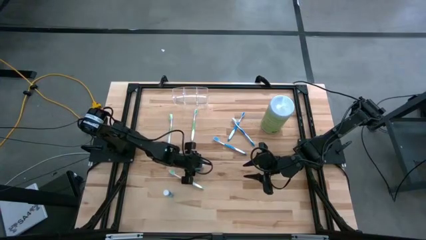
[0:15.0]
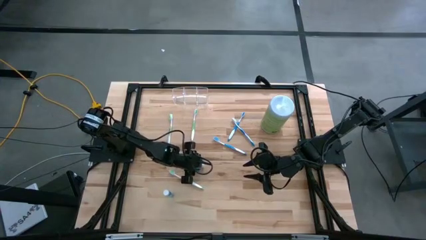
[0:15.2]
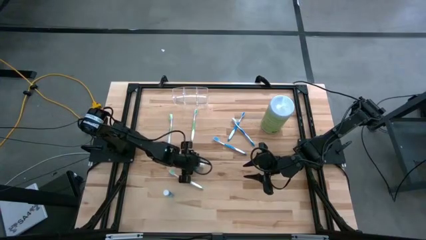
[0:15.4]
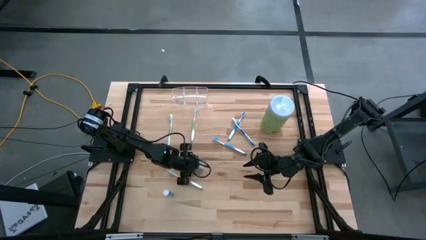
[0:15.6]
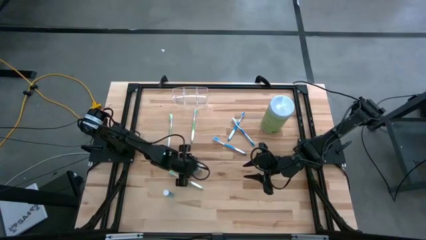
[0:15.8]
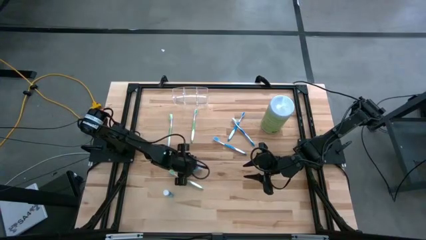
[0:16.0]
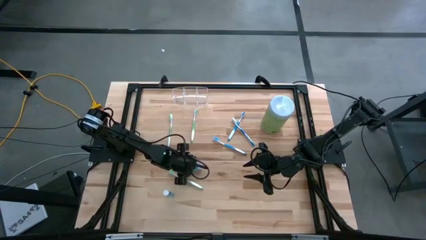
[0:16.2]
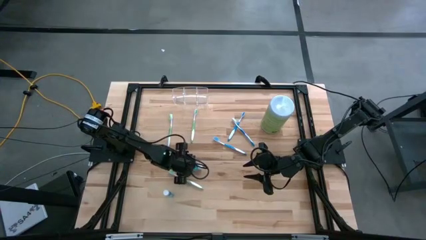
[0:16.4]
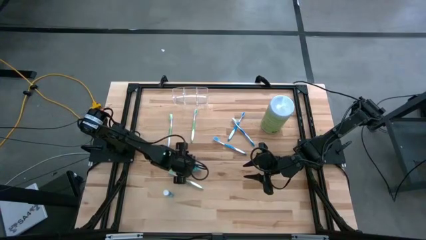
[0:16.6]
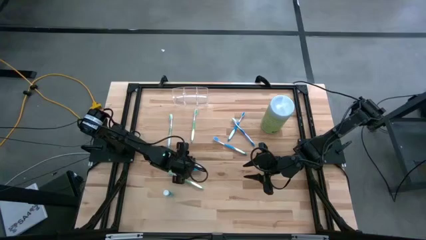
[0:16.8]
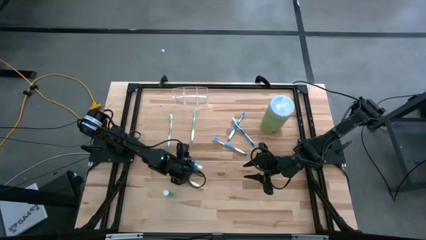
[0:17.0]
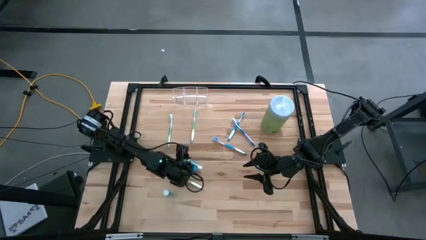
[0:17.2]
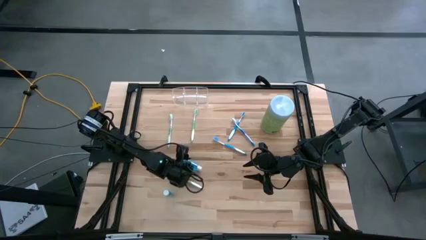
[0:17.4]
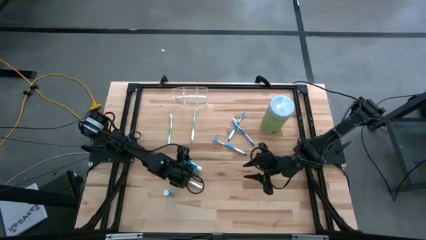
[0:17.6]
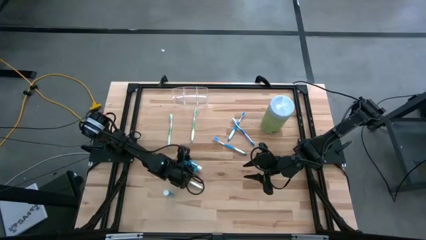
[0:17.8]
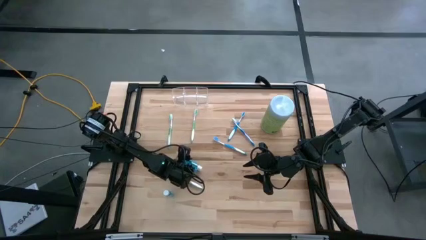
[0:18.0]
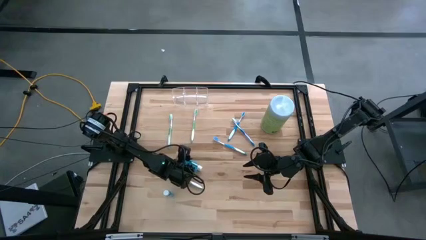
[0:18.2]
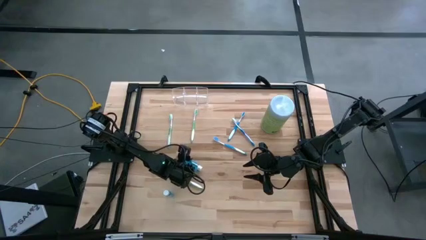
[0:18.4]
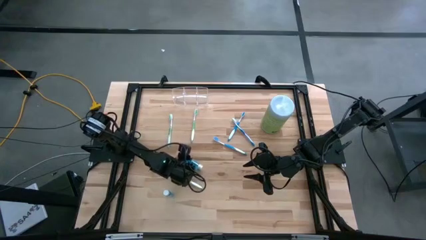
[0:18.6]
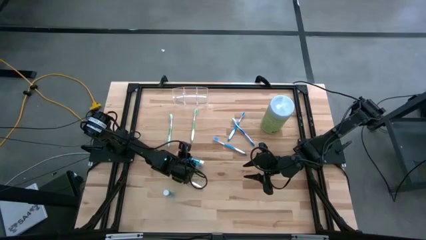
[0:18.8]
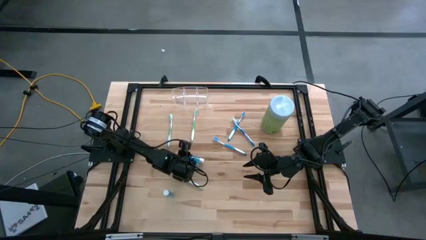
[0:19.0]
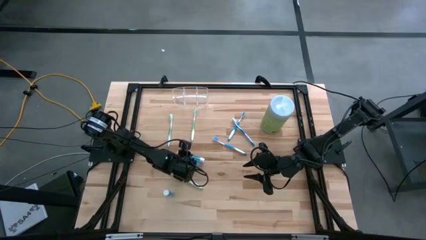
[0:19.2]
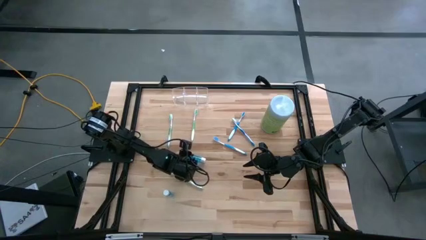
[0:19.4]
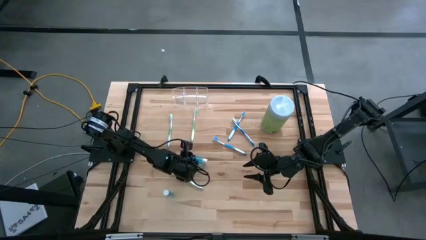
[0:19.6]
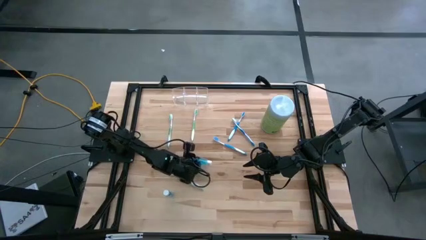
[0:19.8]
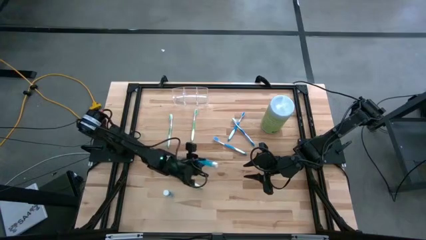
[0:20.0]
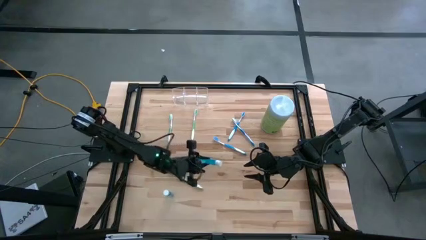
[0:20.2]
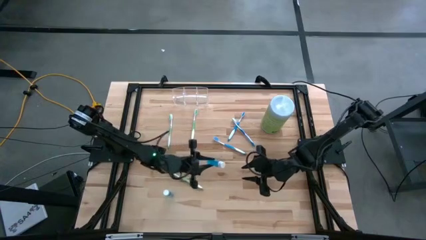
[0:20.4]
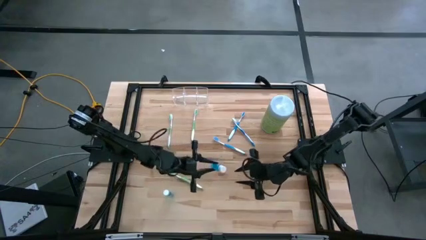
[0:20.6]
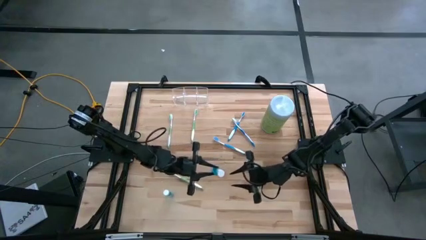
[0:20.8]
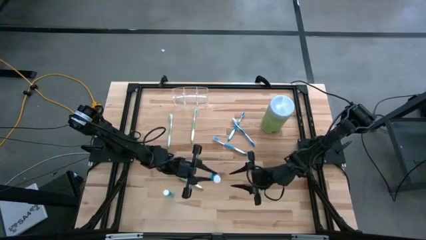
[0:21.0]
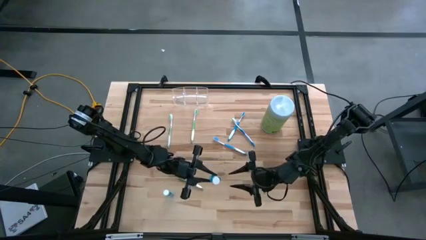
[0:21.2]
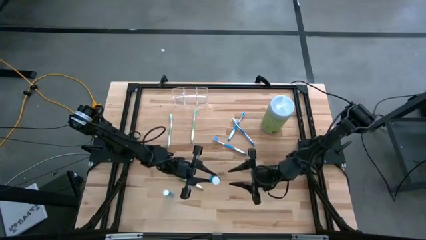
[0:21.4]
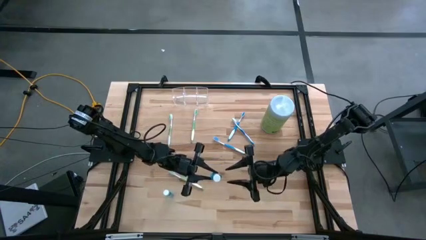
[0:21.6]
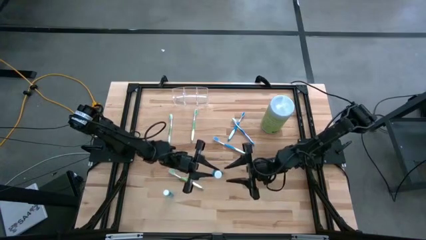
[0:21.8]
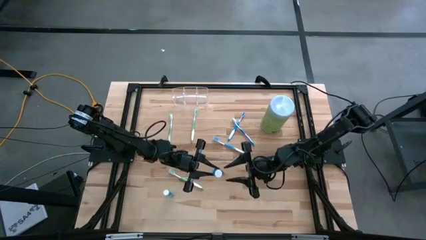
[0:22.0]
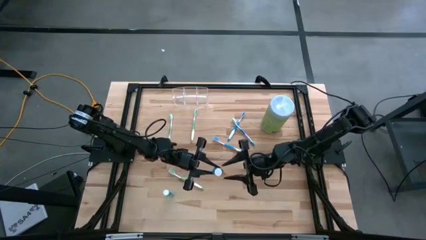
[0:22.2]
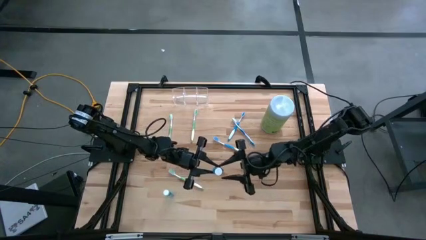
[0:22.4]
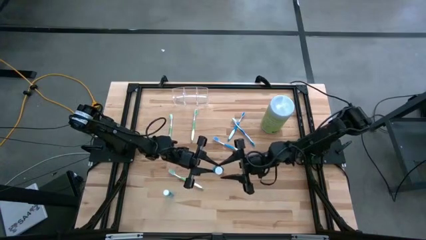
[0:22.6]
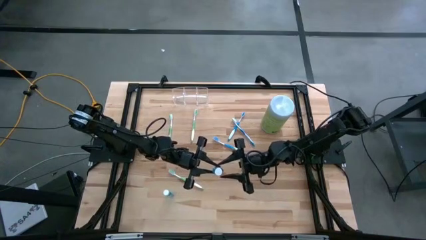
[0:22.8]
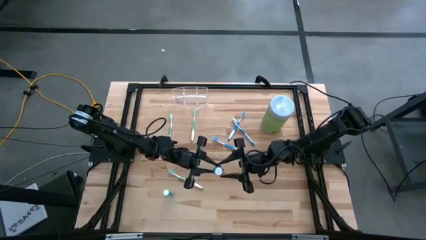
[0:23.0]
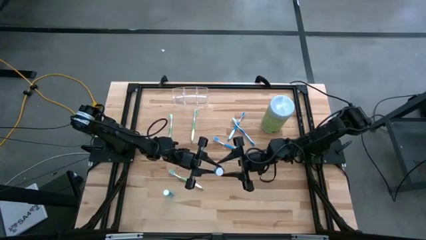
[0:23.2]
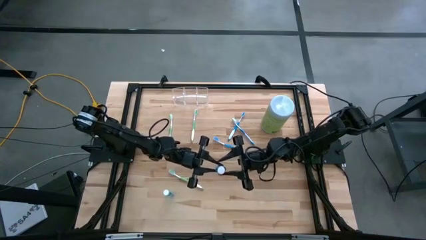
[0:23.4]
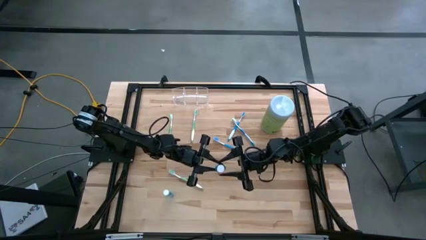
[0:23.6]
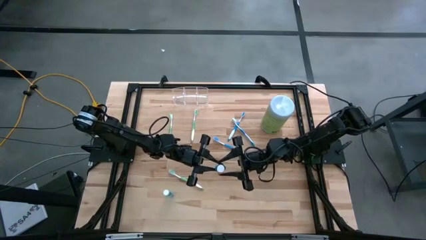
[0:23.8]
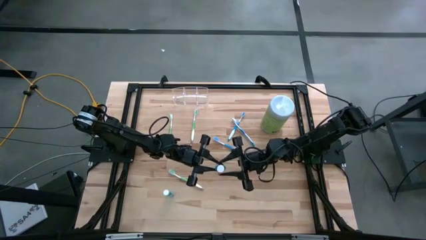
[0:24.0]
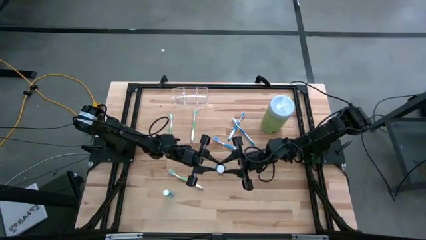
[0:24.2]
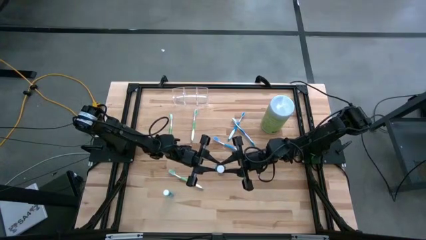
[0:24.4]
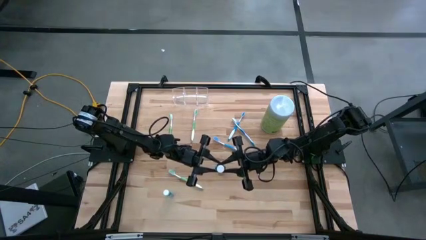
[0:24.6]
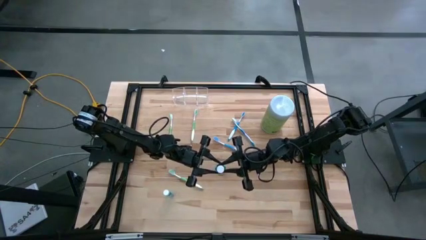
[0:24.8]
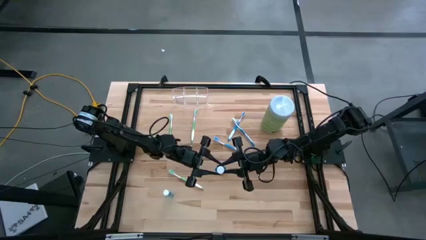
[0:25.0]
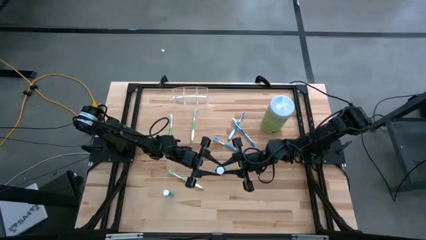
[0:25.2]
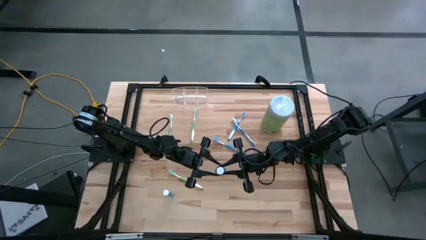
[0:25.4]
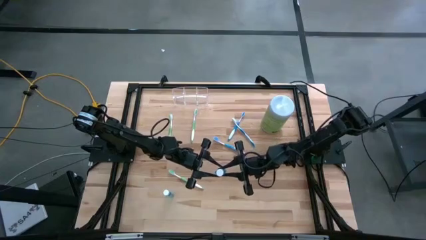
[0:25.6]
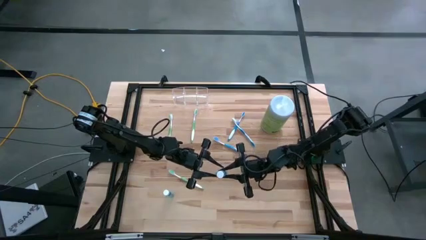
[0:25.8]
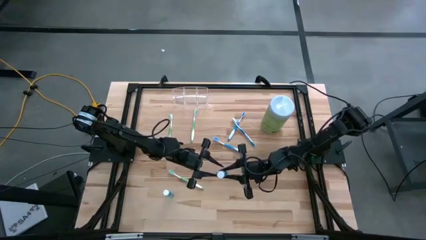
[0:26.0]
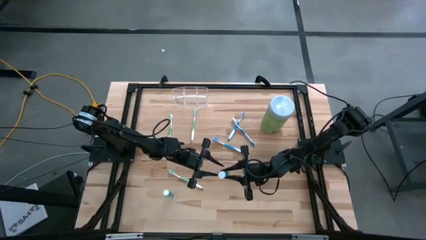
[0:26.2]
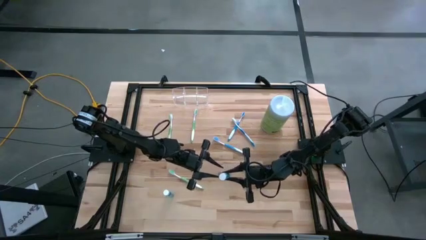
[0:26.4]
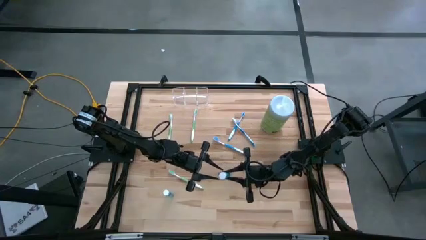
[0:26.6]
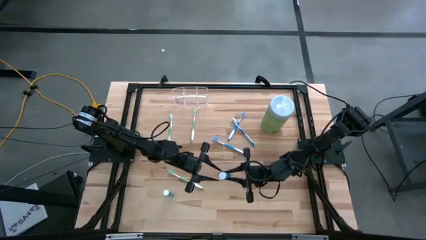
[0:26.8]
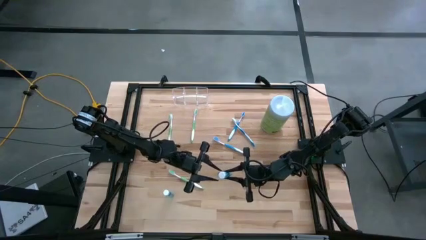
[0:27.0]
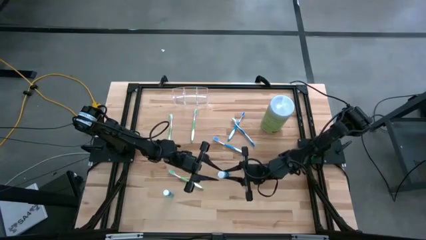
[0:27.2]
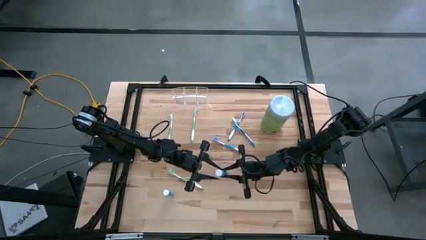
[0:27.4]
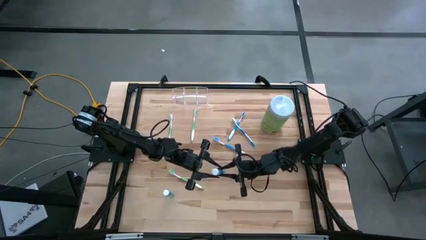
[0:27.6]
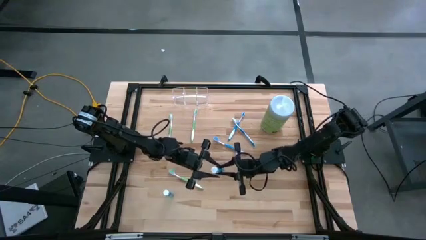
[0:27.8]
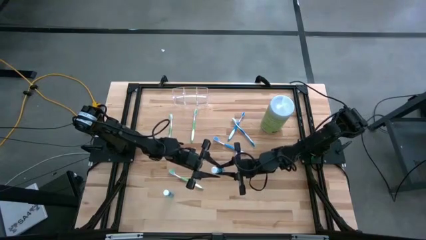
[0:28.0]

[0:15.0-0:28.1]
Task: Pick & Place toothbrushing station
Put the top blue mouthwash into the middle section of the transparent organizer
